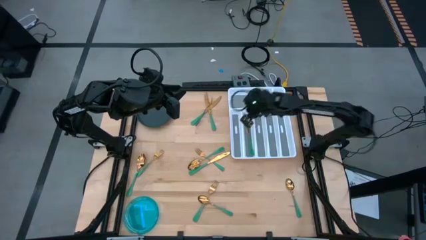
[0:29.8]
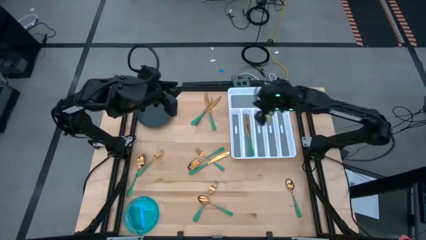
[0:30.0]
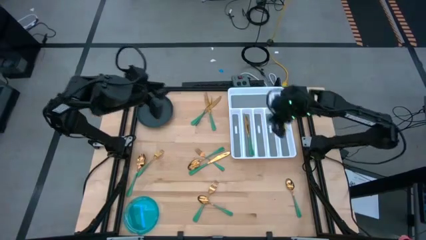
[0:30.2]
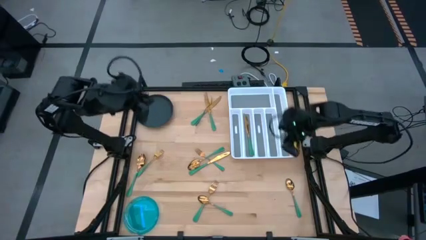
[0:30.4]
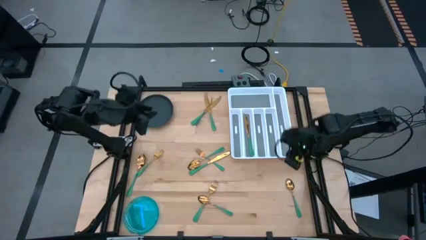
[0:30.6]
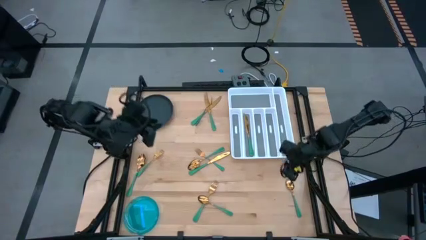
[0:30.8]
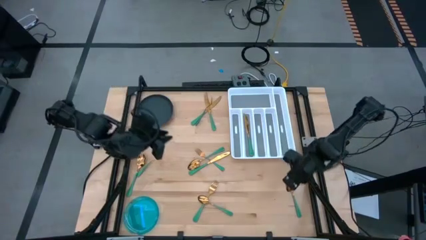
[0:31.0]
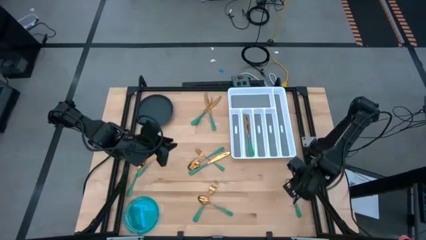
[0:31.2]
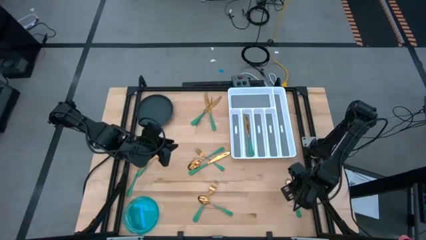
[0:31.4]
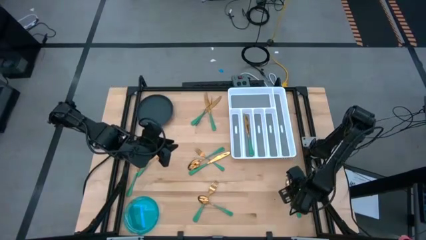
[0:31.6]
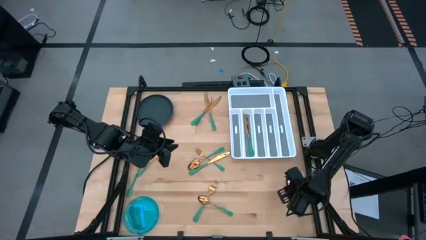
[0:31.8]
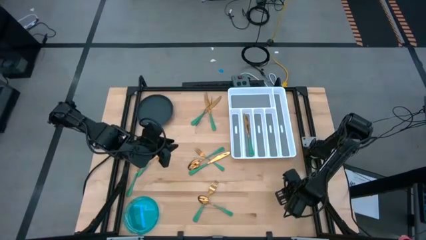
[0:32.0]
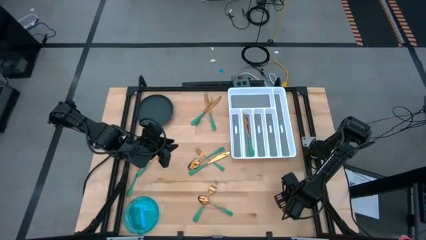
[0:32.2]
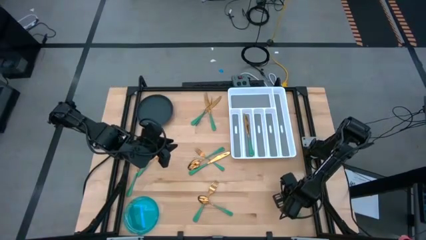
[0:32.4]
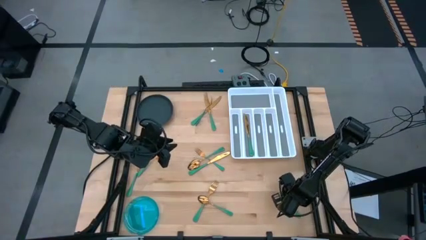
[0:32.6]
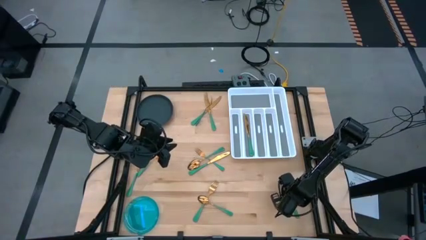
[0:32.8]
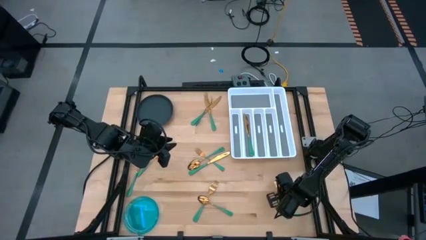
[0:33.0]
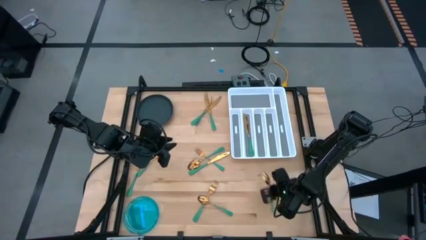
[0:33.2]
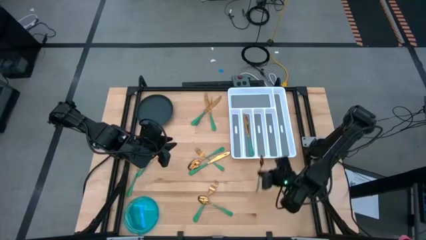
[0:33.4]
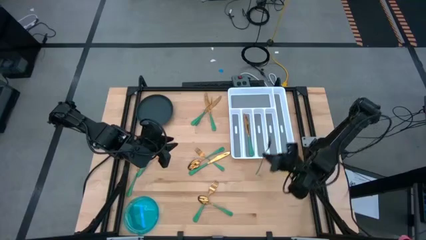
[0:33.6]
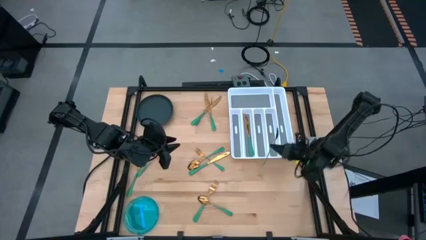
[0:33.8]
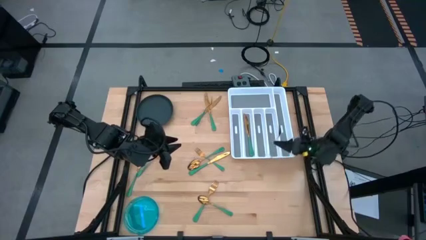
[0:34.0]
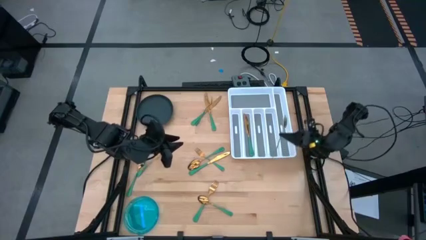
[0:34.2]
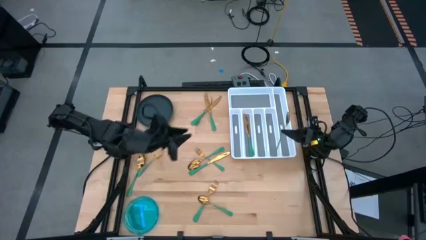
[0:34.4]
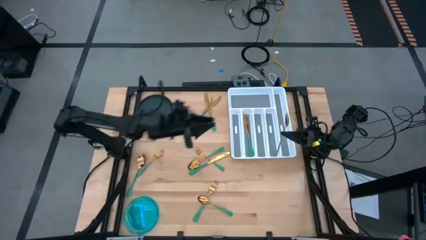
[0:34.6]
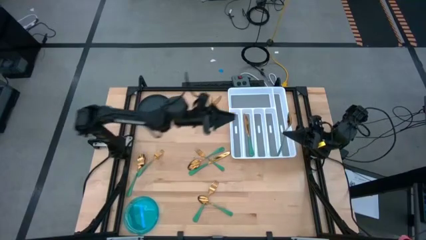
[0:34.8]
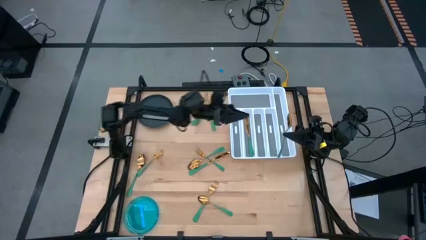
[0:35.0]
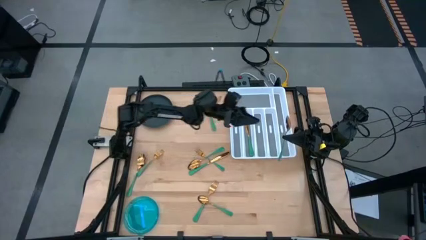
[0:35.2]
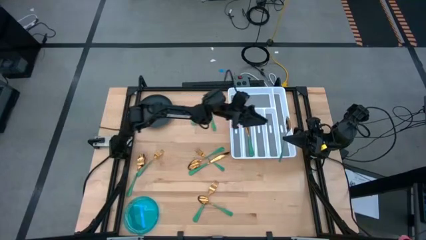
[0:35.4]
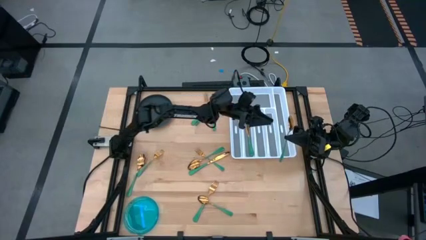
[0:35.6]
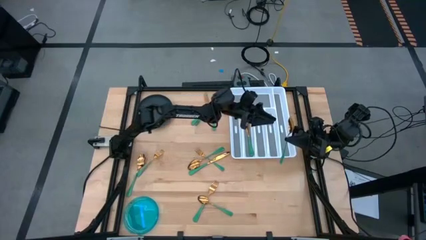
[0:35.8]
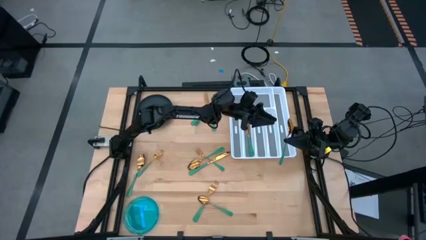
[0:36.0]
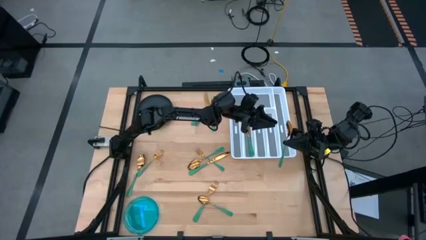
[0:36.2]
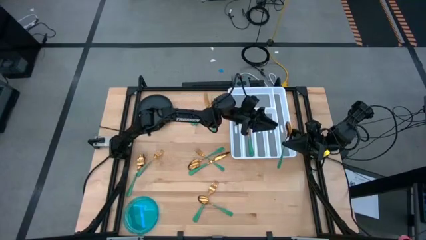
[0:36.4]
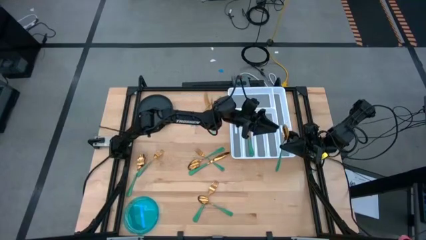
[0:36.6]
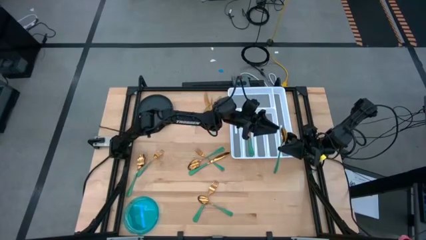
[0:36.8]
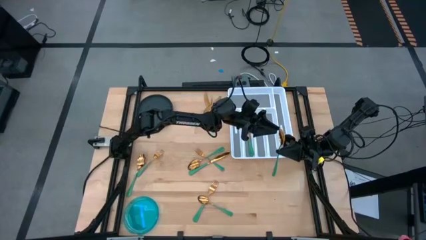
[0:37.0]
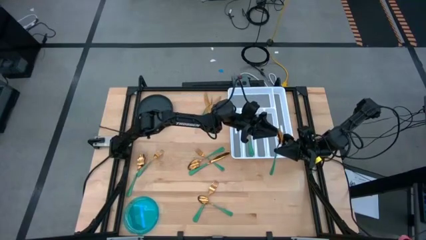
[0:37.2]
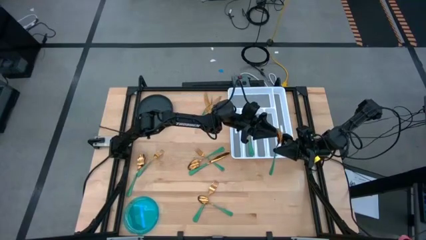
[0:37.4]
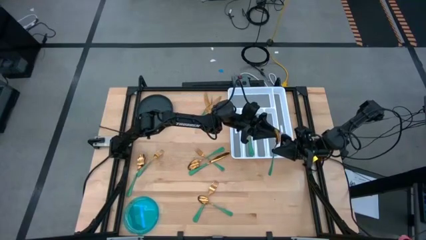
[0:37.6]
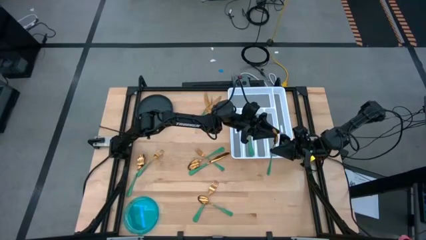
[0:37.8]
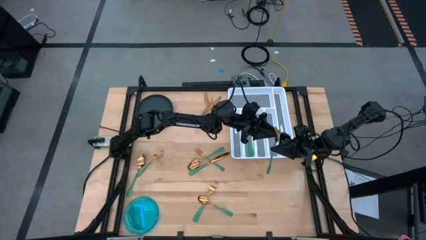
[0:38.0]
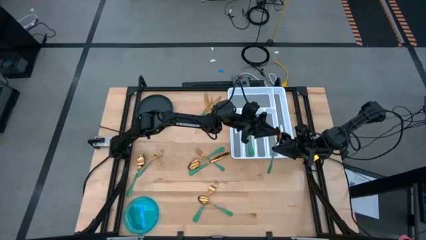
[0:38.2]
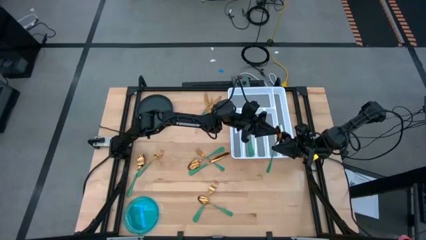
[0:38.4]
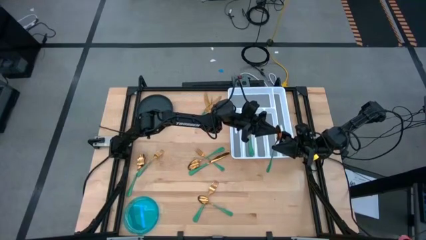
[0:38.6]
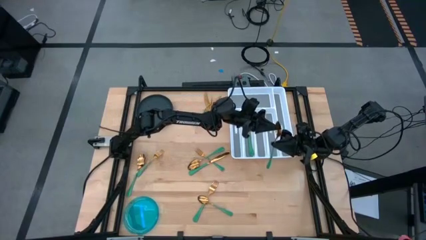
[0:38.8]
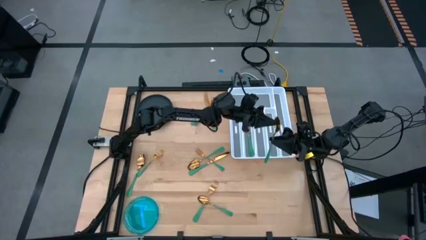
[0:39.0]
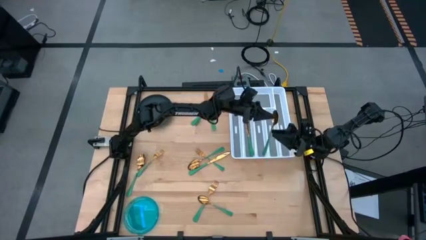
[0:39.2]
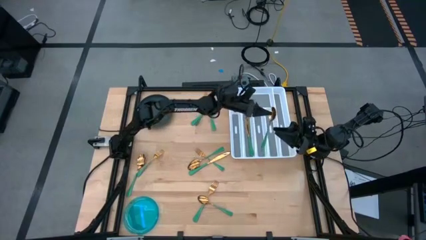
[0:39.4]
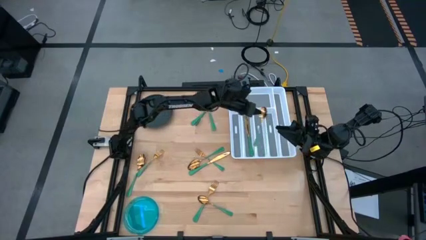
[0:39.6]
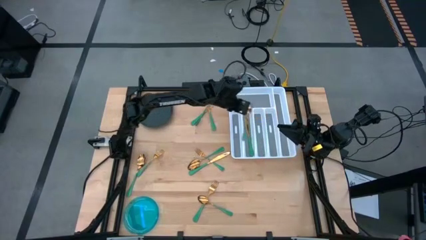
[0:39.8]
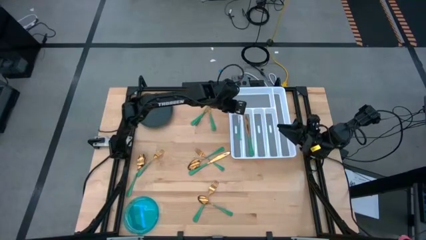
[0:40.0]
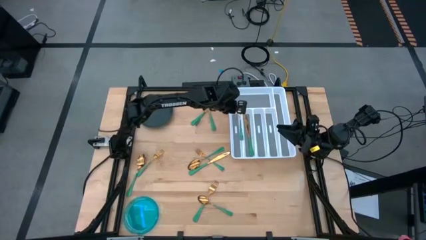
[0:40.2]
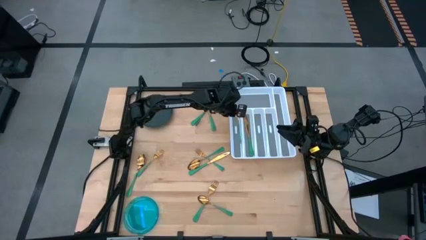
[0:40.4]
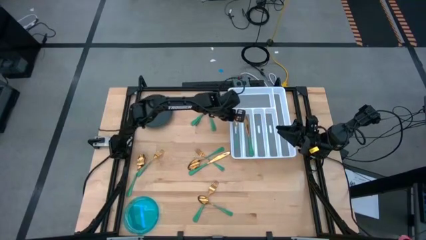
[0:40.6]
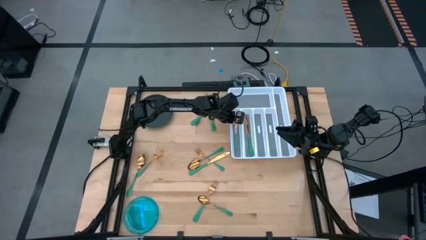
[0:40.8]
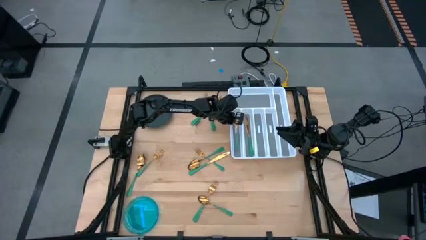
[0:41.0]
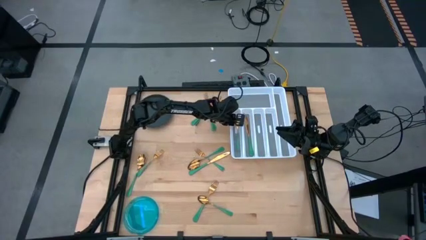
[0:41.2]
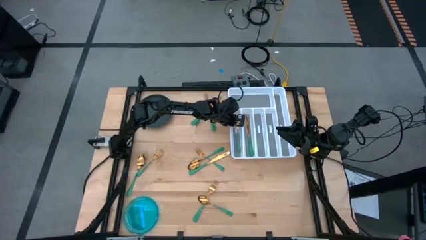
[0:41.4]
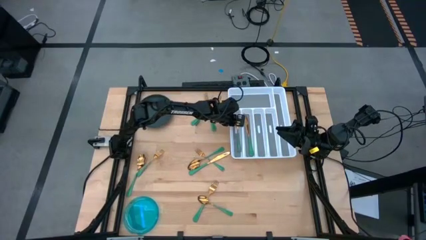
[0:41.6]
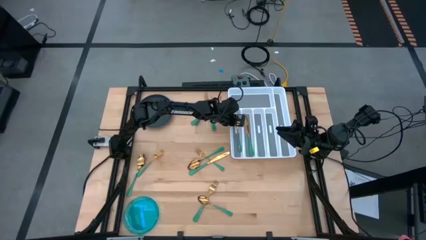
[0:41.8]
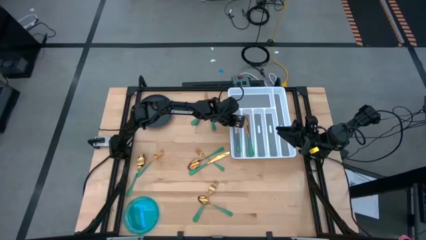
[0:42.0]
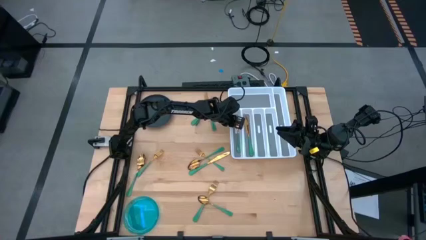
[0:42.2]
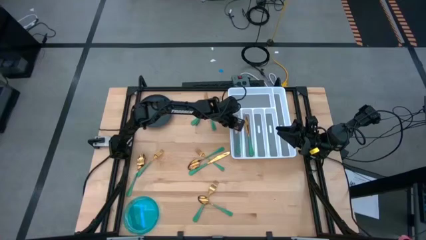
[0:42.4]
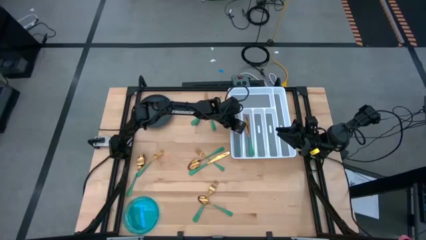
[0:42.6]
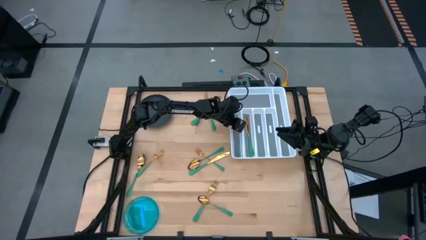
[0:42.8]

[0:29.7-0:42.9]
Task: Sort silverware
Put the green spoon on the silverware organizer

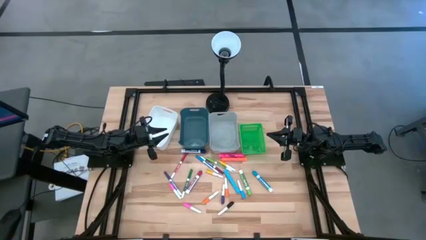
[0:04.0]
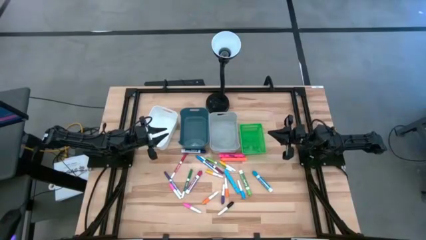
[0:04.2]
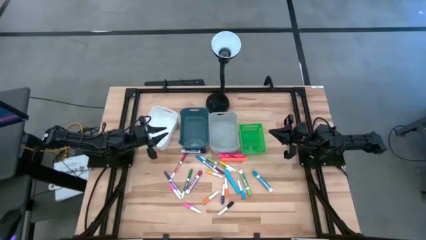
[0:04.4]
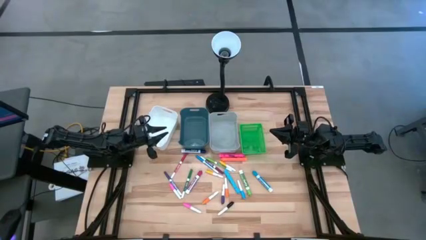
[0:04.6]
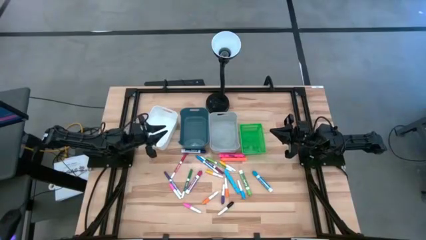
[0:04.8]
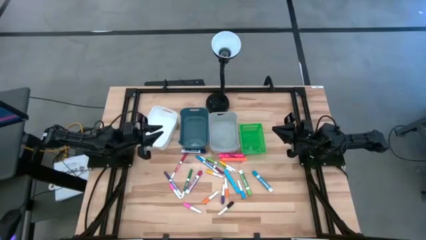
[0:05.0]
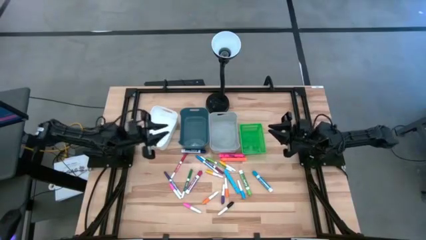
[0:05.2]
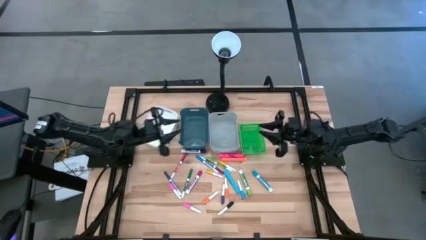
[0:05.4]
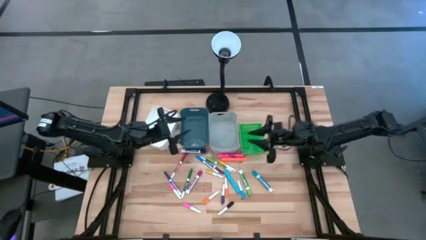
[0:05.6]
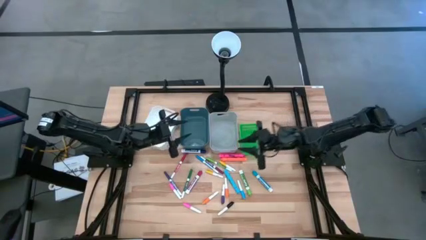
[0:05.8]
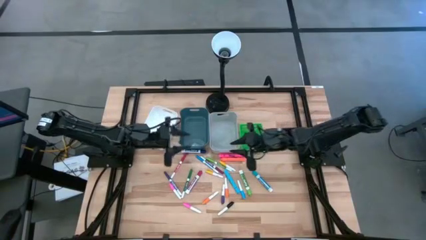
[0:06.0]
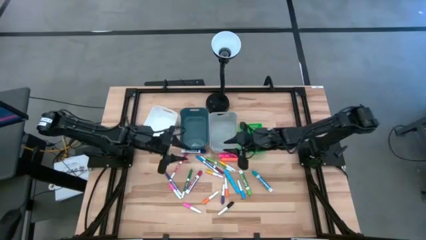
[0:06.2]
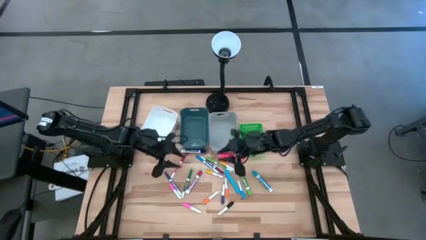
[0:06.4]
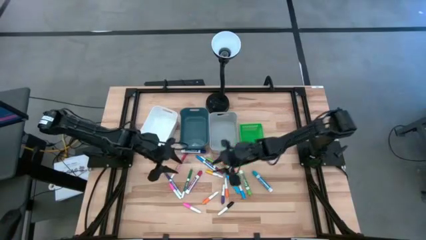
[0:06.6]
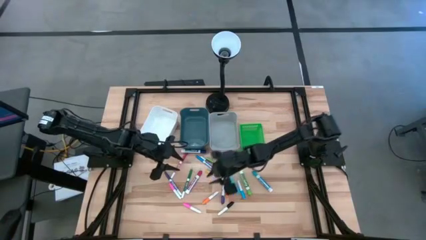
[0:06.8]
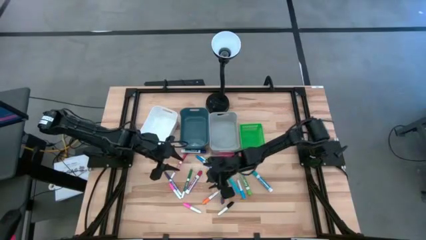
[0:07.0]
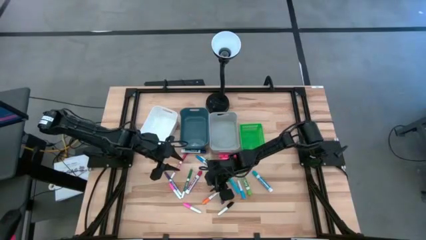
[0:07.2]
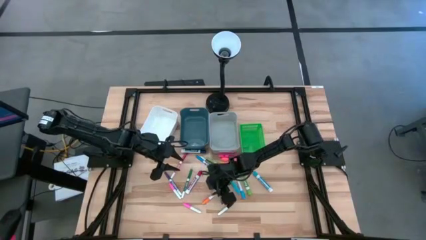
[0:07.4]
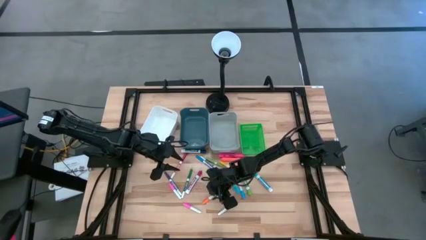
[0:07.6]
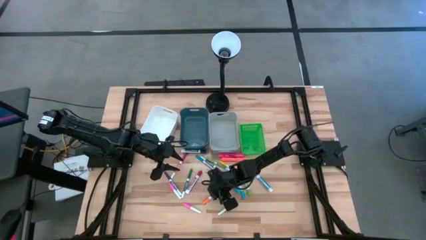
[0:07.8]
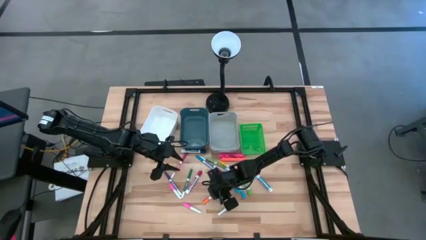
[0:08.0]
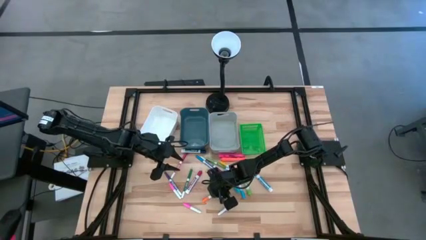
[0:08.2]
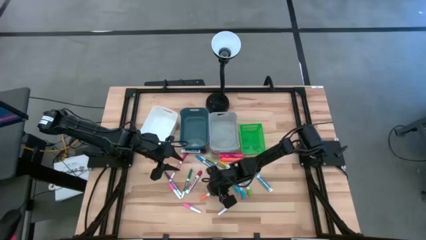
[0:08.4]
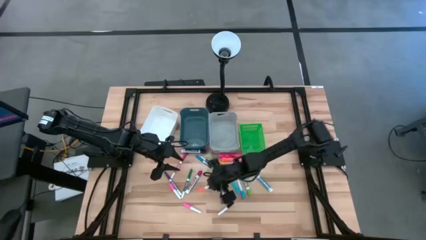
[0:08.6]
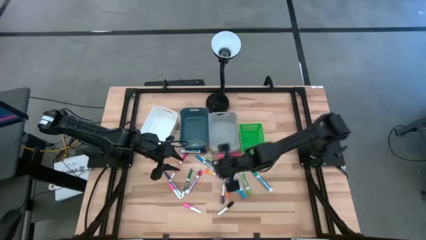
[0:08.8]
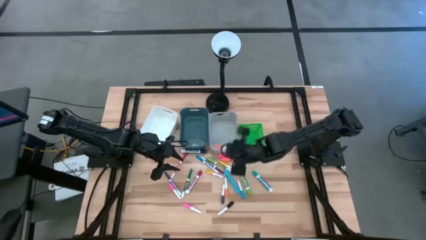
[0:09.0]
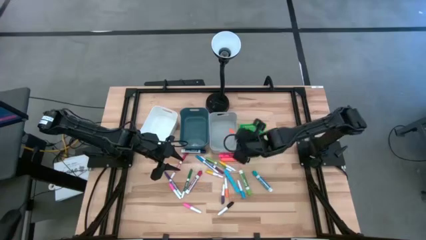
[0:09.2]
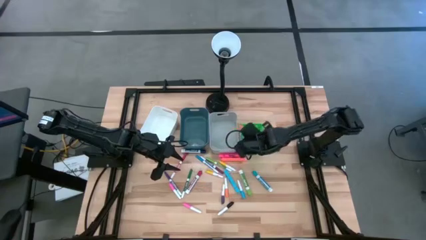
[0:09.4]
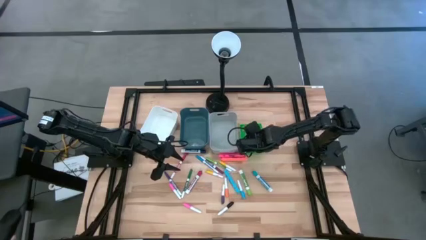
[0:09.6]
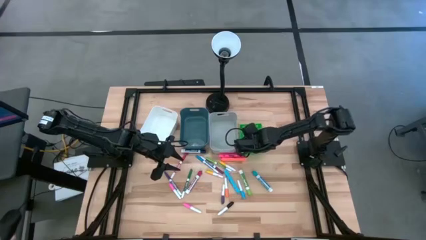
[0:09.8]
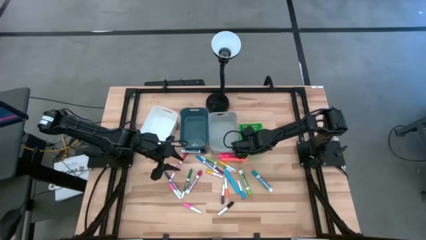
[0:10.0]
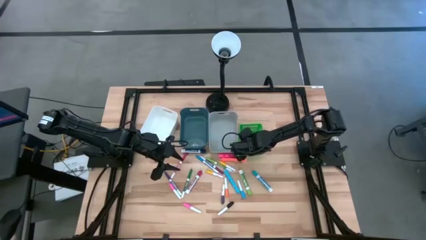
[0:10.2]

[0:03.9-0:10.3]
Task: Pick & Place Markers
Put the bottom small orange highlighter pen into the green bin
